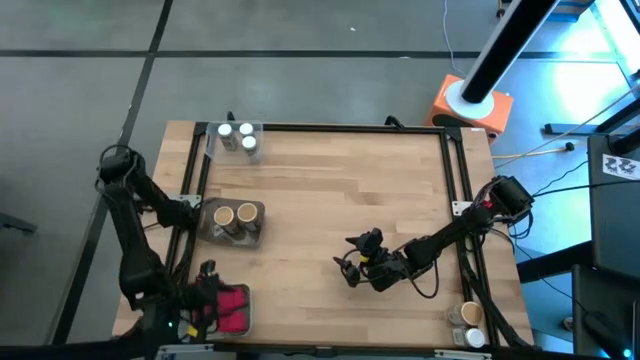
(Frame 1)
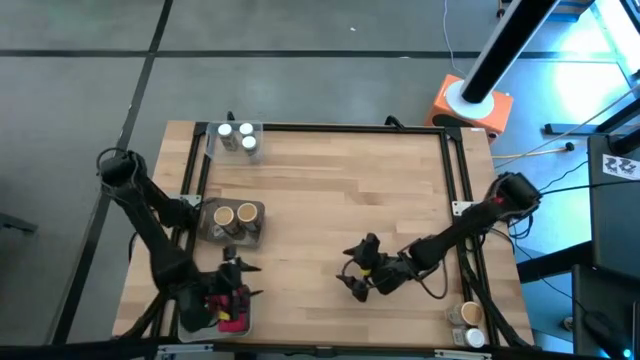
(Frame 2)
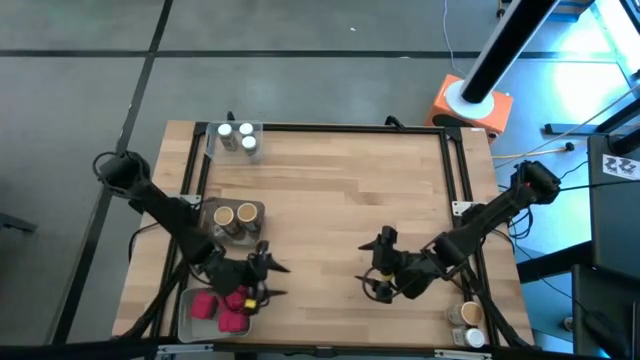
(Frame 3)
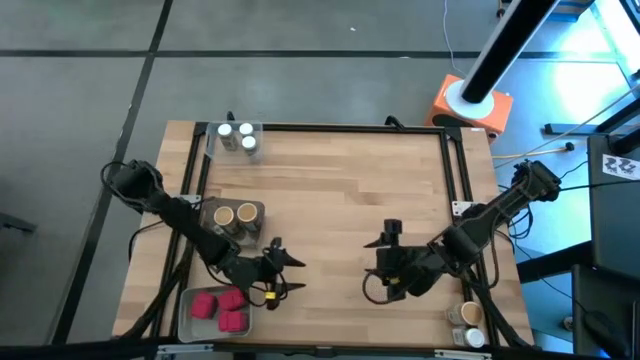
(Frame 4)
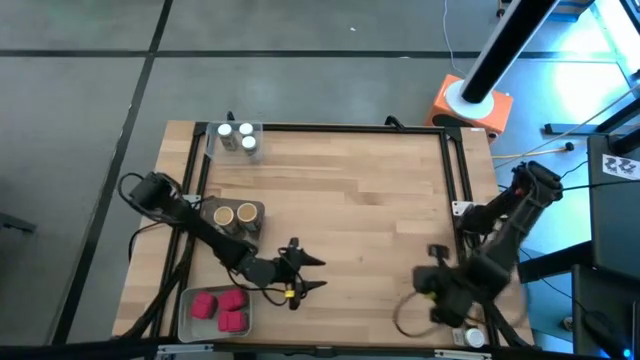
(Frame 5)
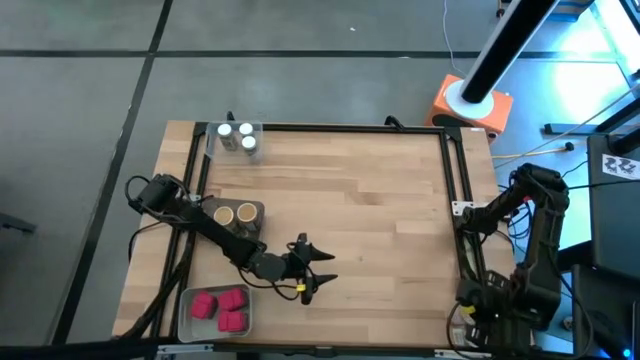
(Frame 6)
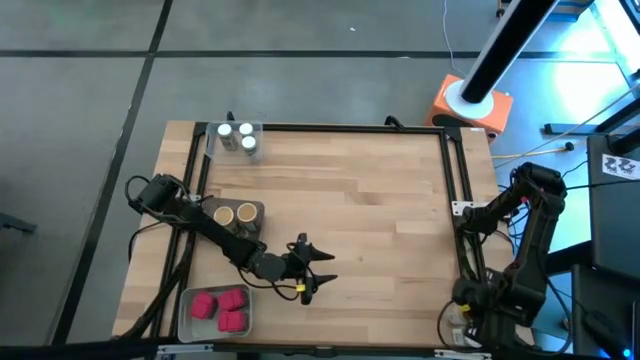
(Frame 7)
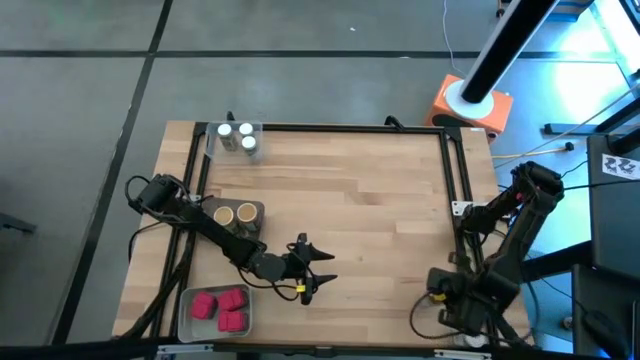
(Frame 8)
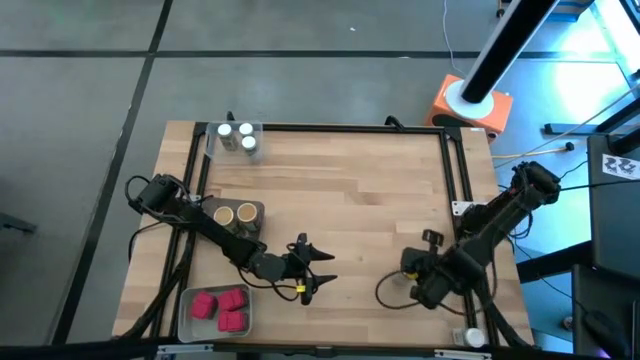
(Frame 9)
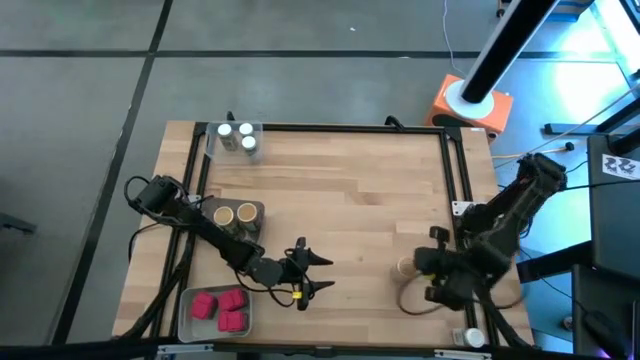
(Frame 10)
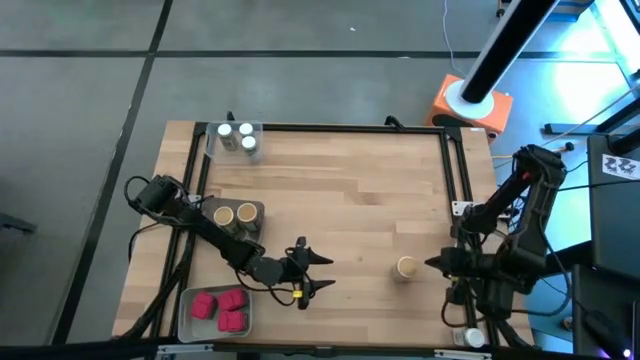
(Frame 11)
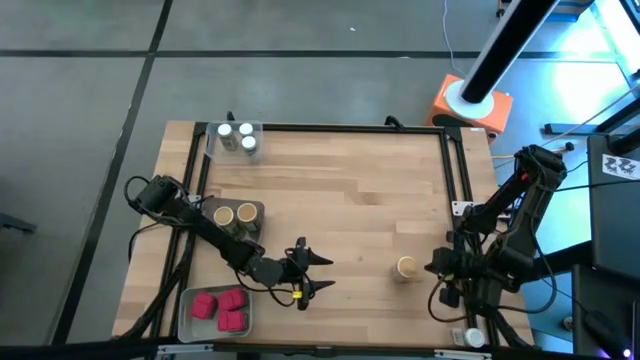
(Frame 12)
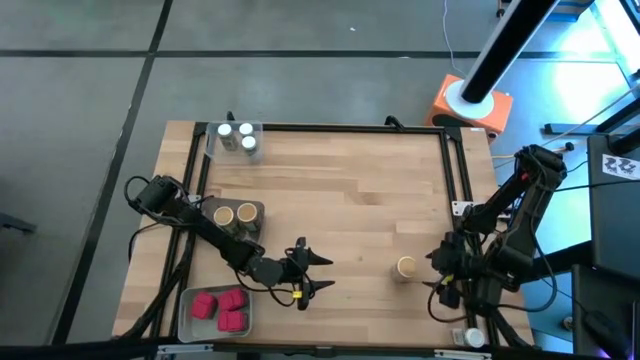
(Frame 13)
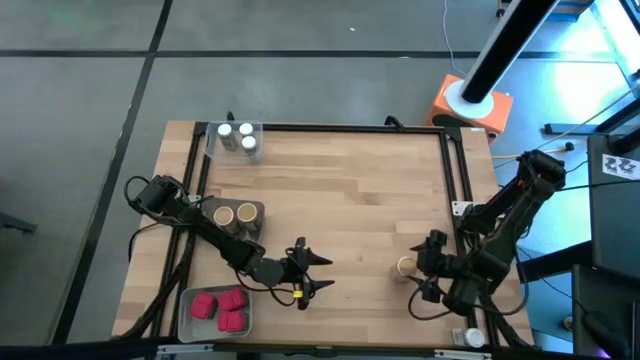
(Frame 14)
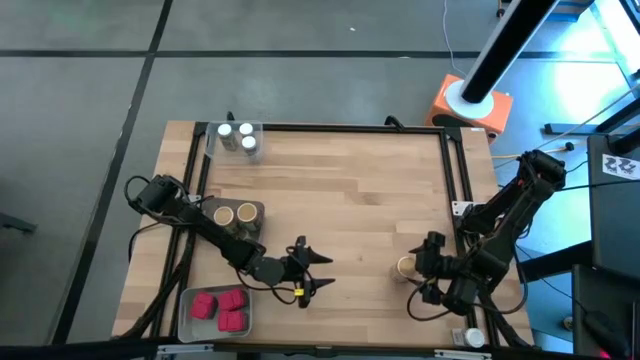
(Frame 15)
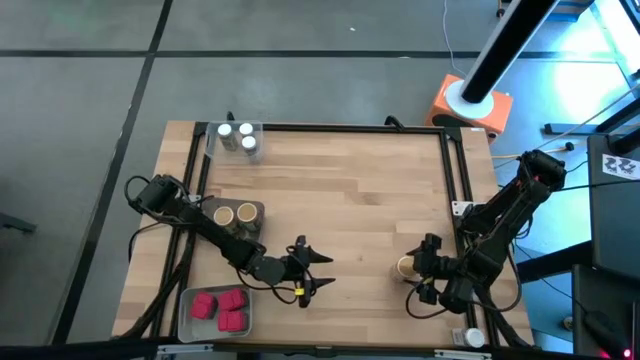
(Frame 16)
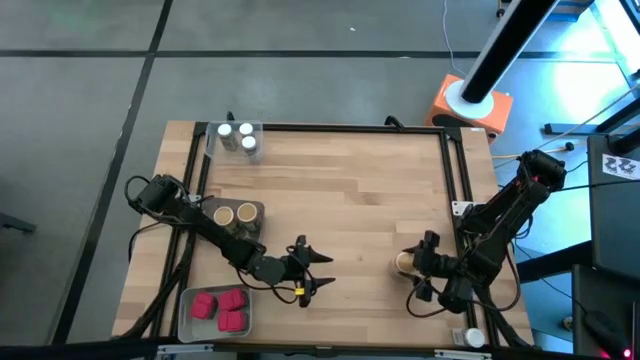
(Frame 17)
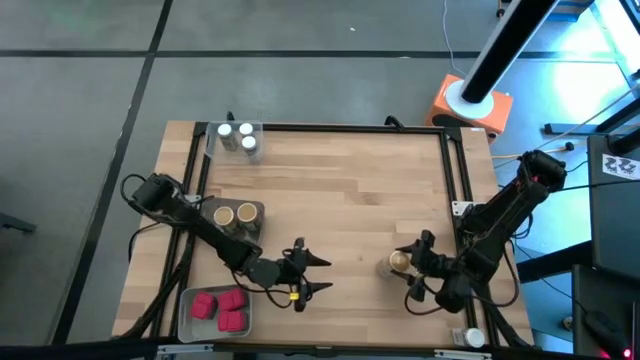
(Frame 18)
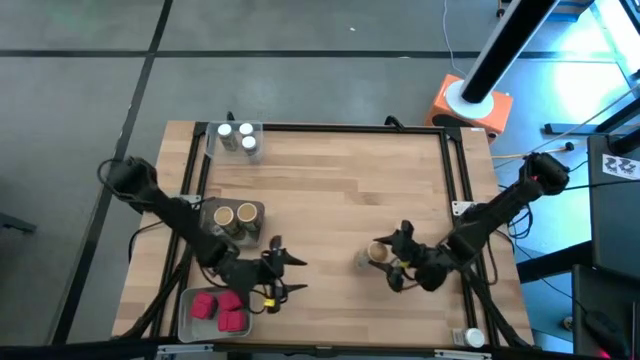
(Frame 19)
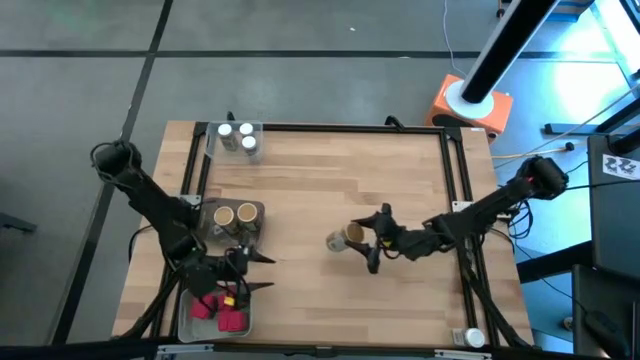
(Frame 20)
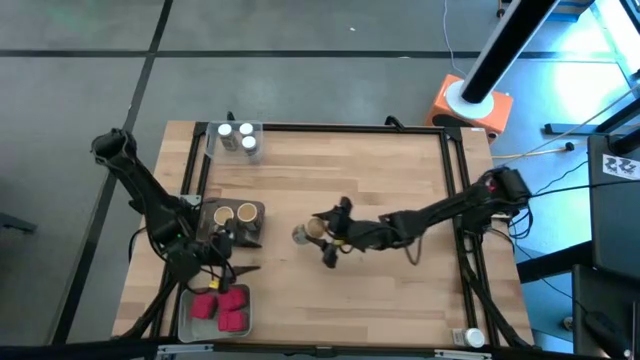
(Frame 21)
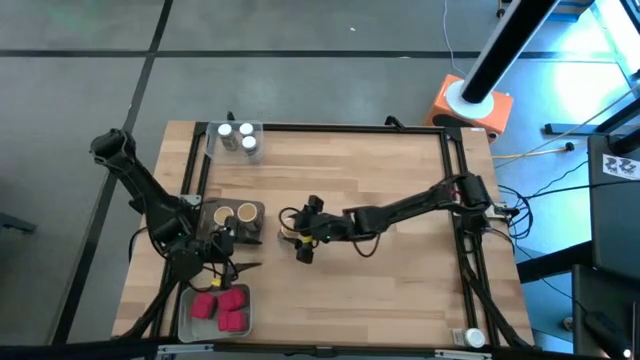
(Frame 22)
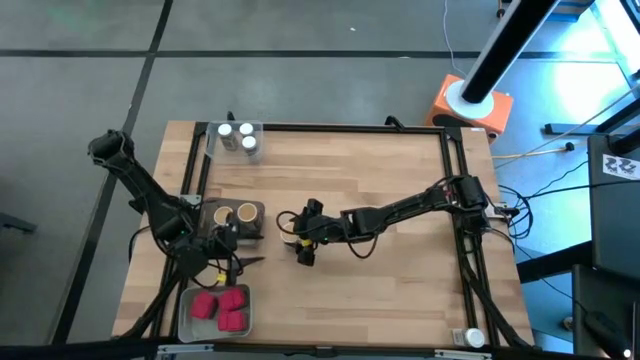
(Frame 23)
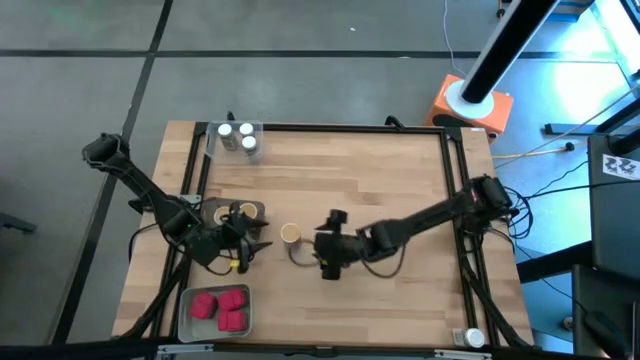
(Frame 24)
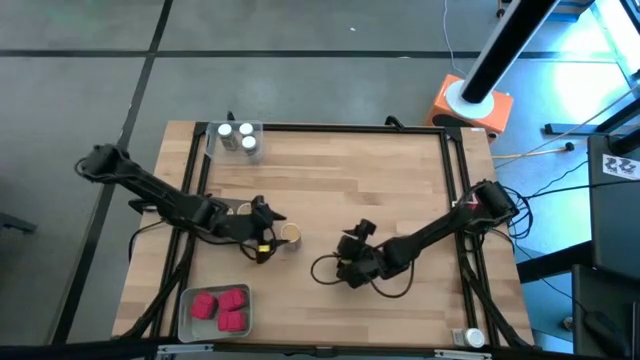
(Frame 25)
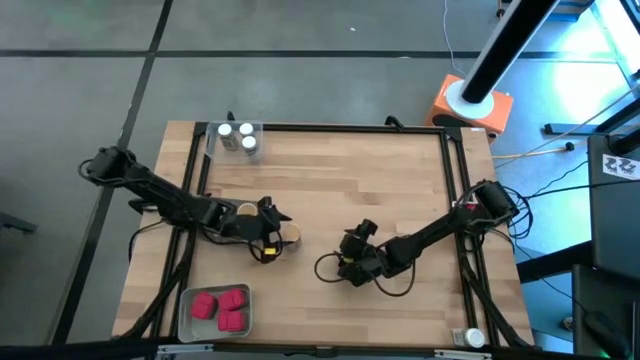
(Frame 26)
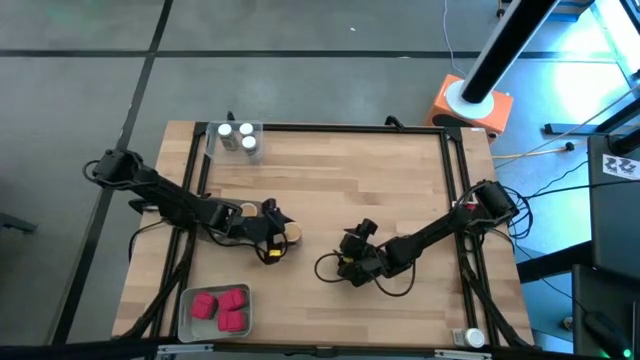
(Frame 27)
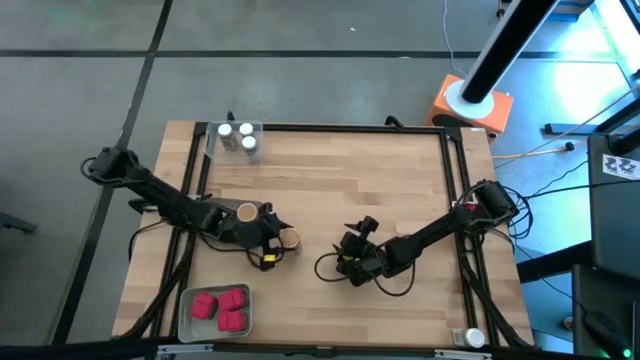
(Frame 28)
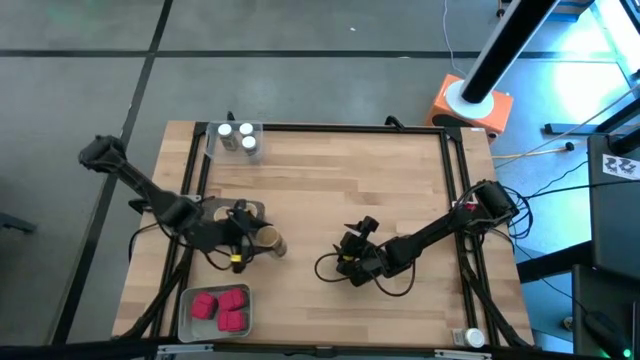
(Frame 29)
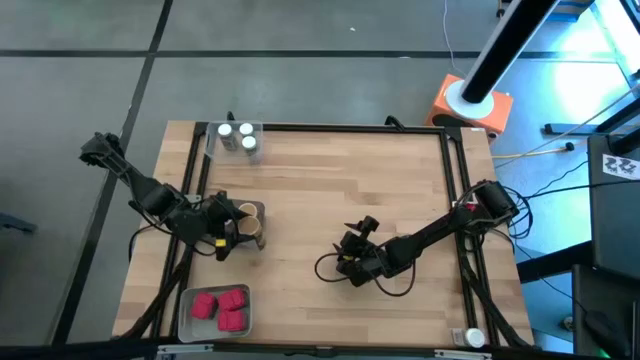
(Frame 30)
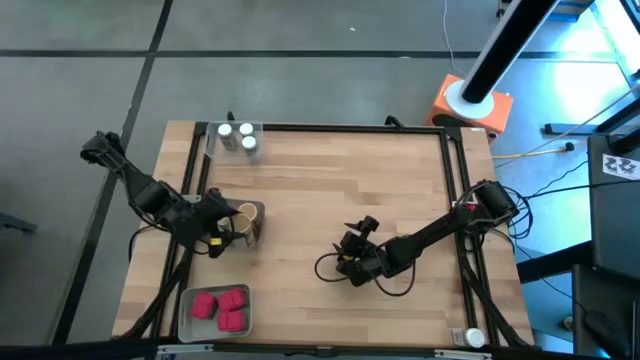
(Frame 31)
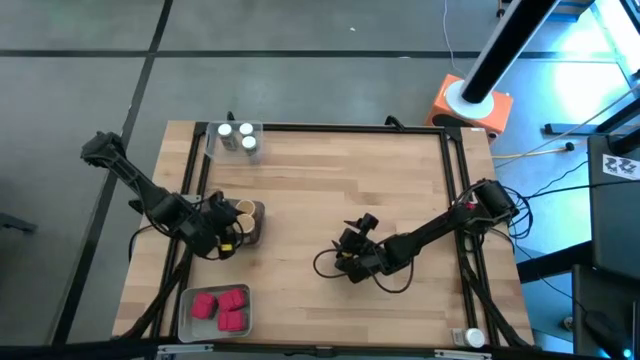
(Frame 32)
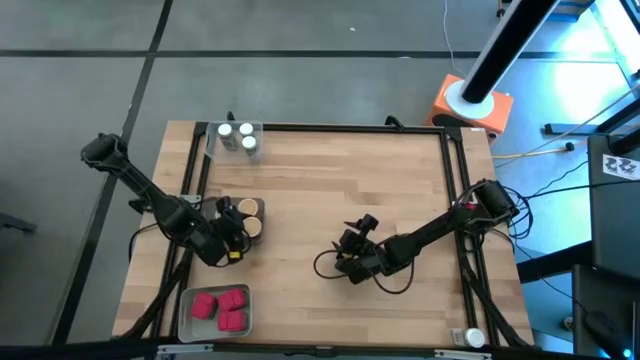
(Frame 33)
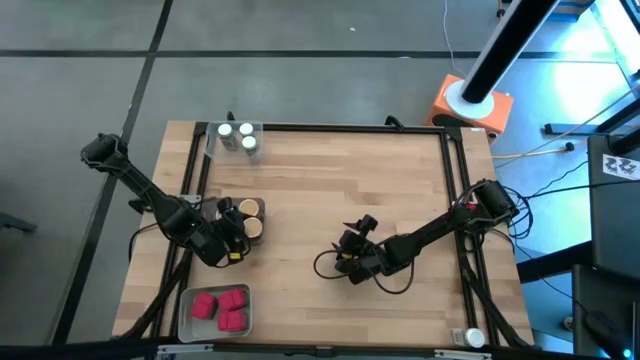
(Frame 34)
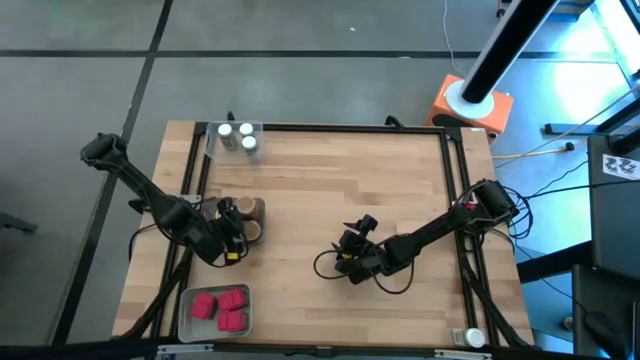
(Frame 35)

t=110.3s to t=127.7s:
Task: Sort spices by type
Put the brown spice bottle into the black bin

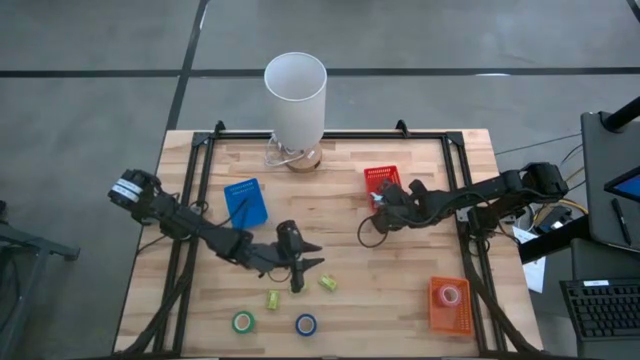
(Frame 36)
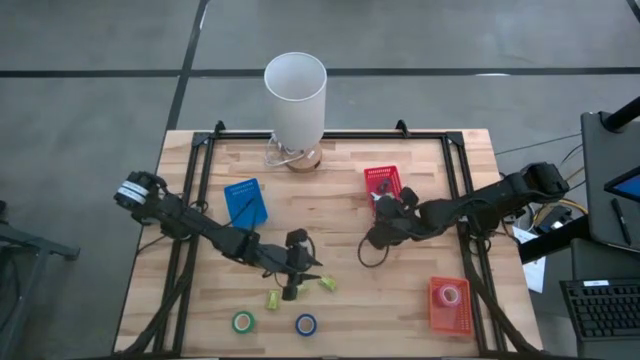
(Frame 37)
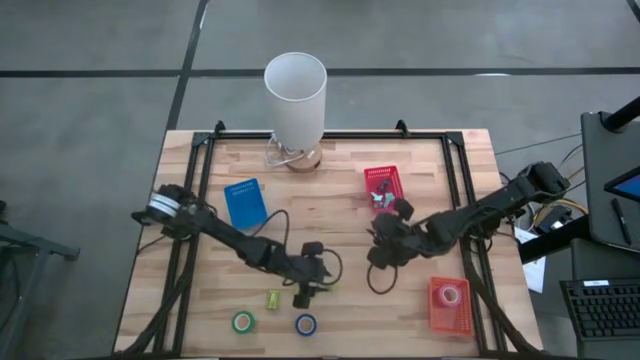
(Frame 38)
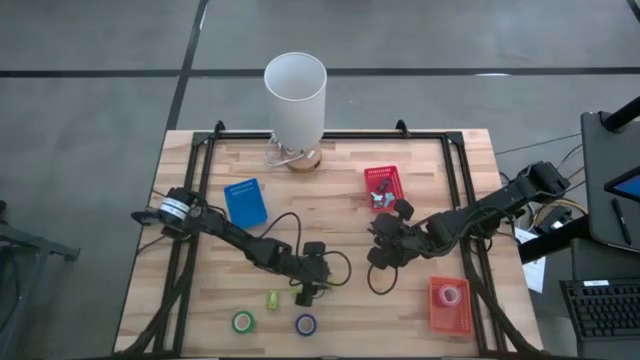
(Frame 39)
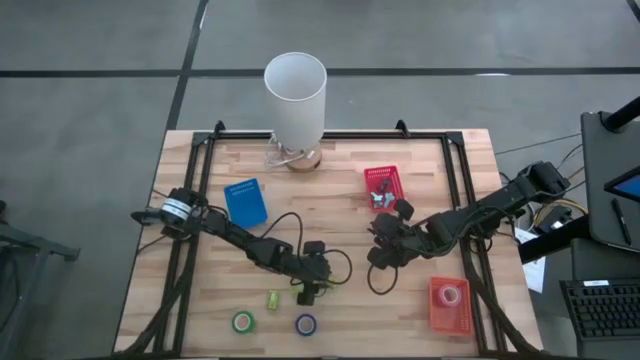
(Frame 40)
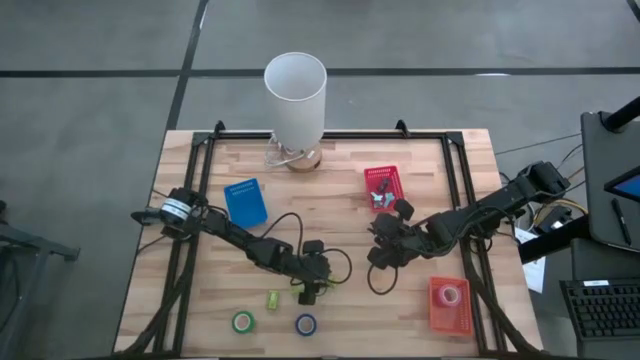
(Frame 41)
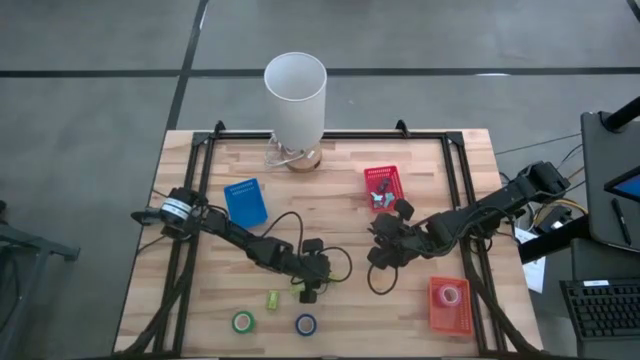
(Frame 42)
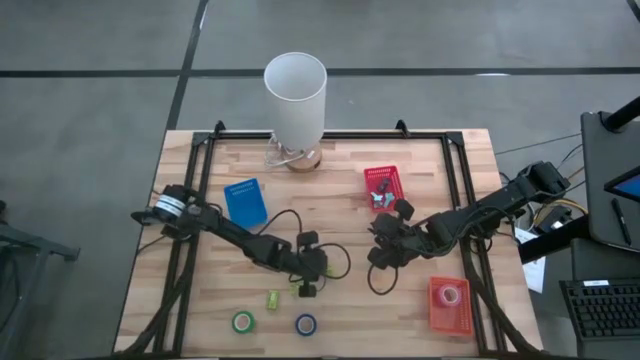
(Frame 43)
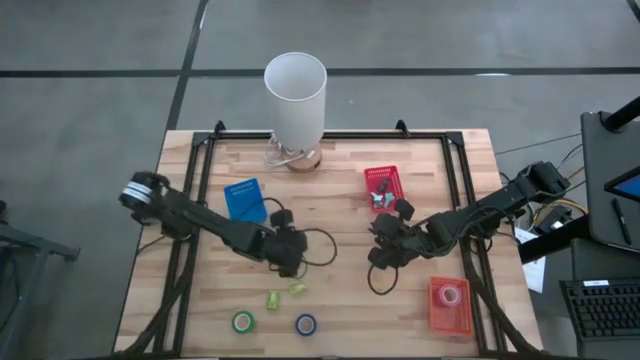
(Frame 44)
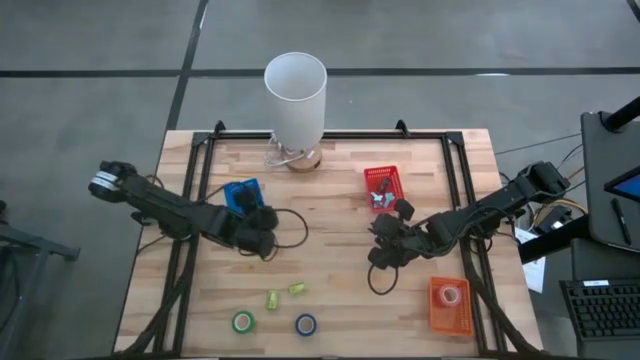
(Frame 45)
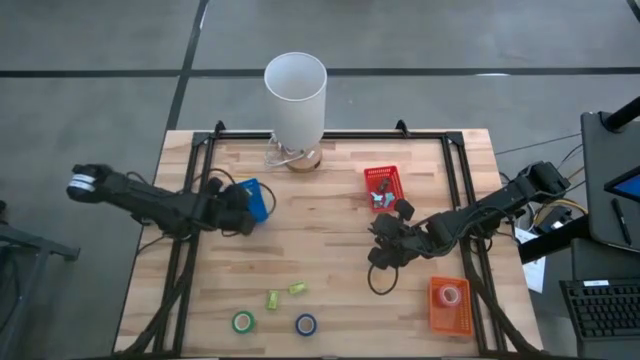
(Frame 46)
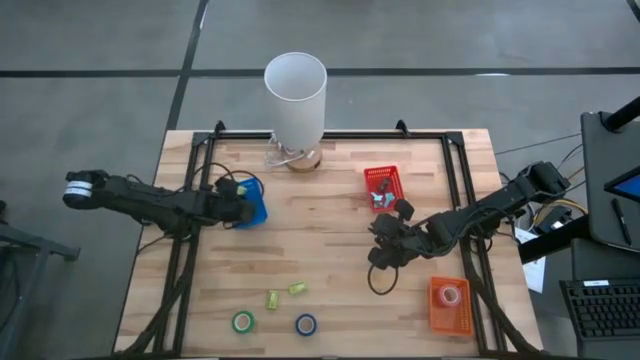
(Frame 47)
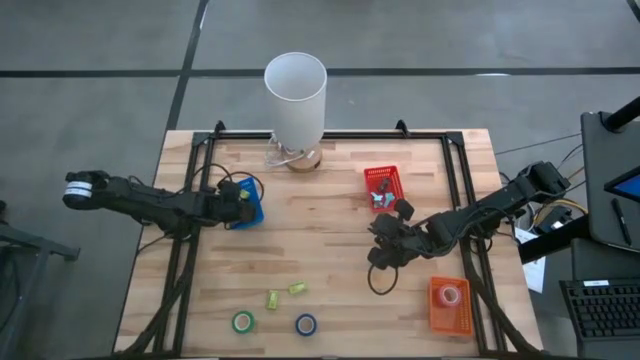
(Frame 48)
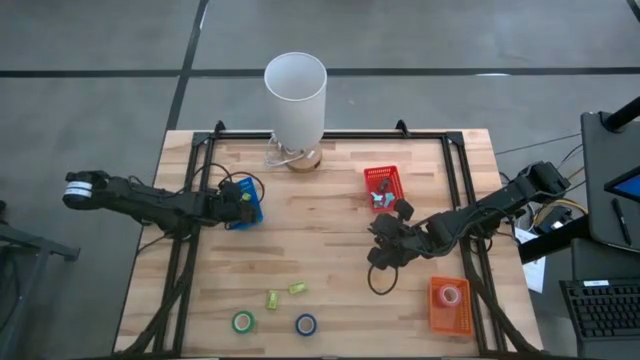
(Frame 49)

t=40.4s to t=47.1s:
Task: Pick and place Stapler, Stapler remover, tape
Put the staple wire into the blue basket
